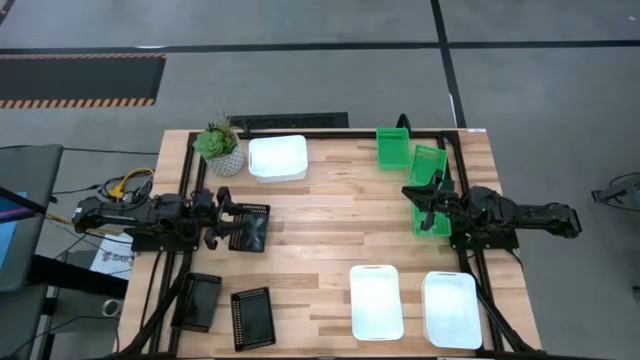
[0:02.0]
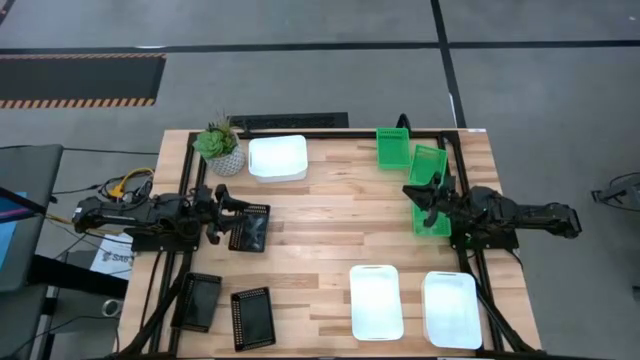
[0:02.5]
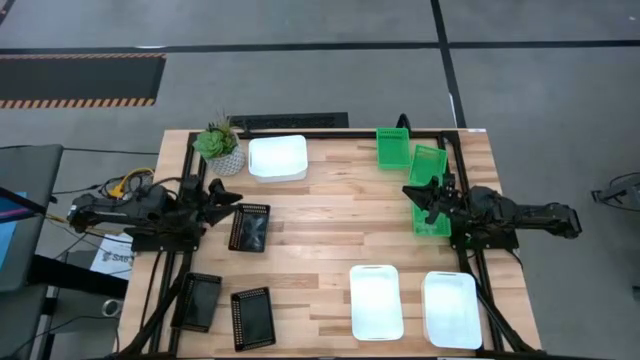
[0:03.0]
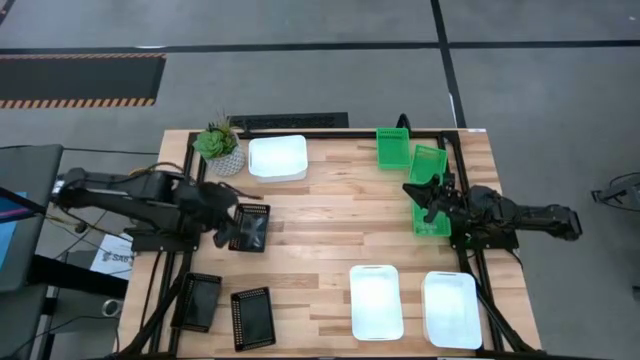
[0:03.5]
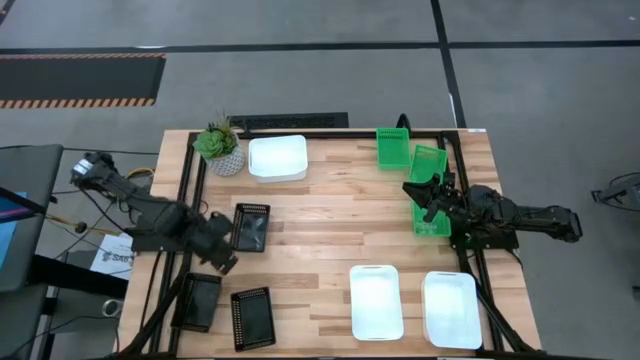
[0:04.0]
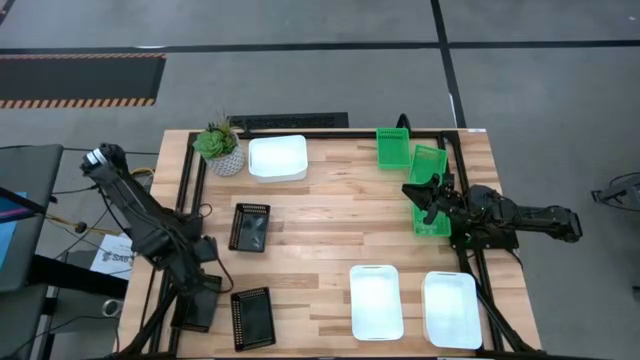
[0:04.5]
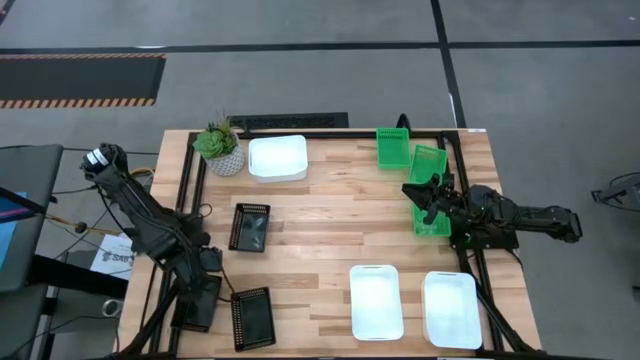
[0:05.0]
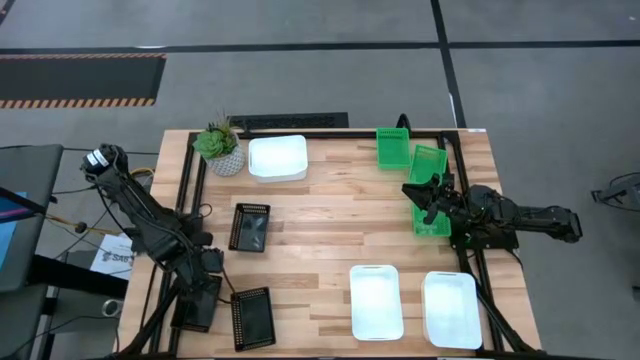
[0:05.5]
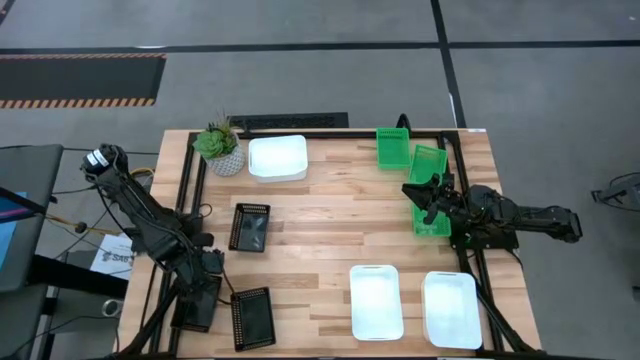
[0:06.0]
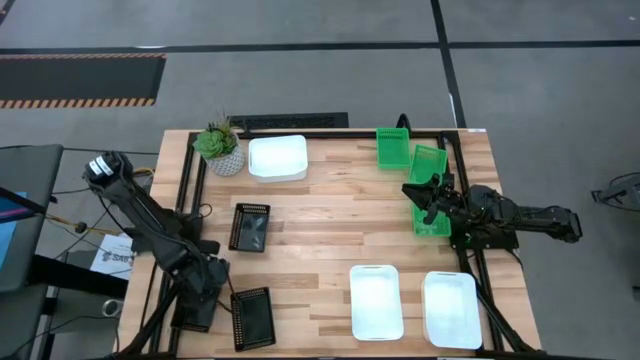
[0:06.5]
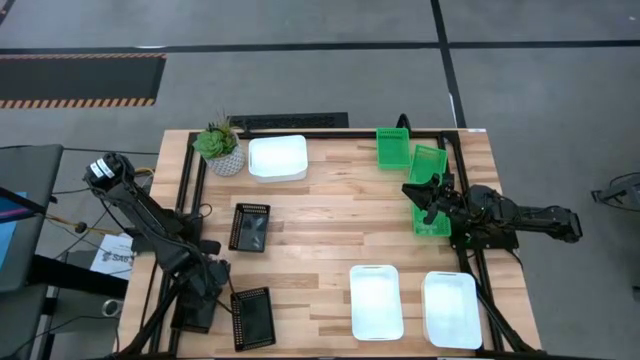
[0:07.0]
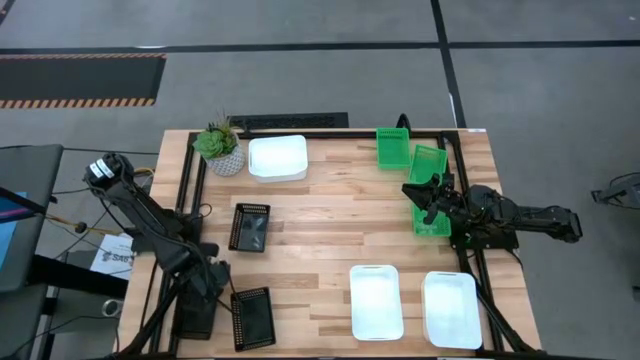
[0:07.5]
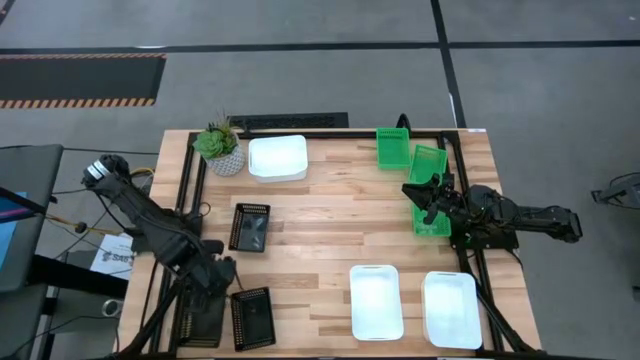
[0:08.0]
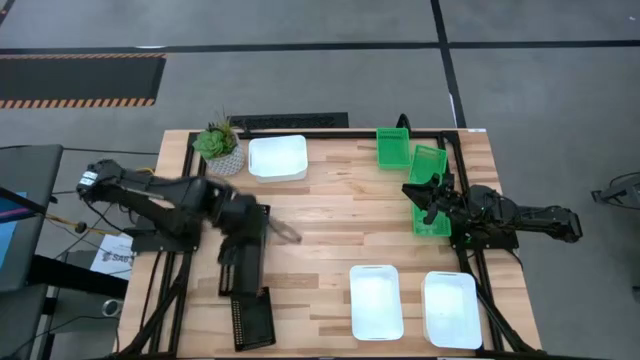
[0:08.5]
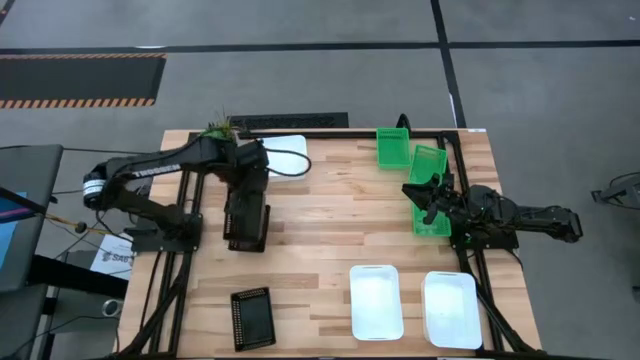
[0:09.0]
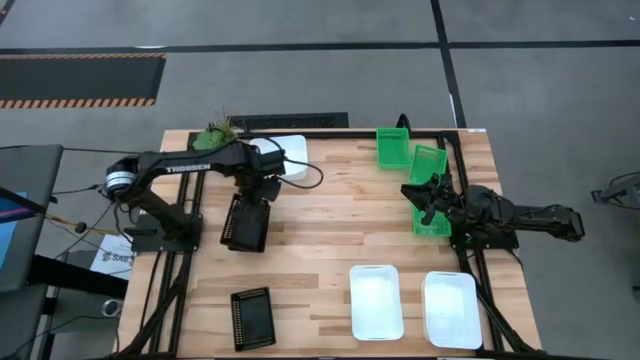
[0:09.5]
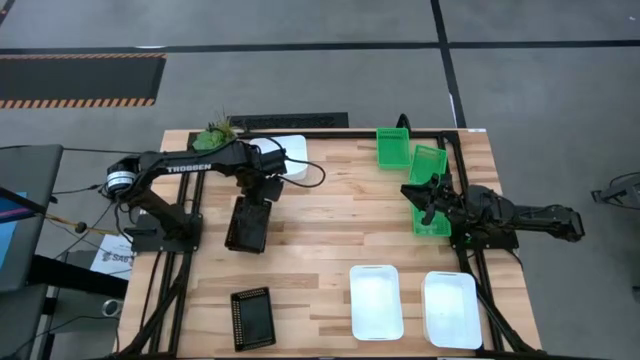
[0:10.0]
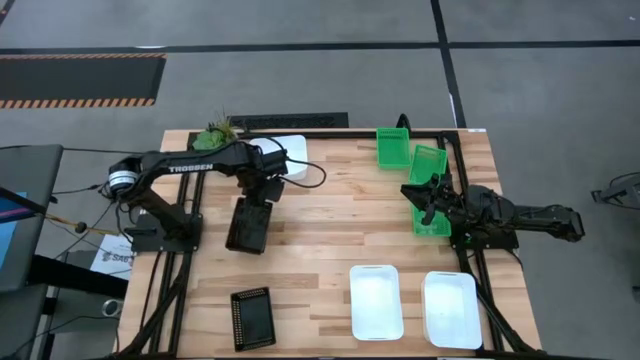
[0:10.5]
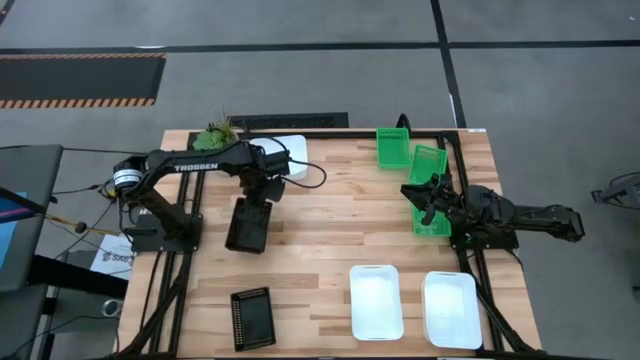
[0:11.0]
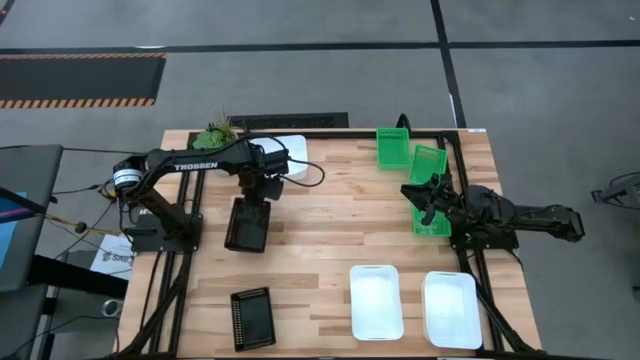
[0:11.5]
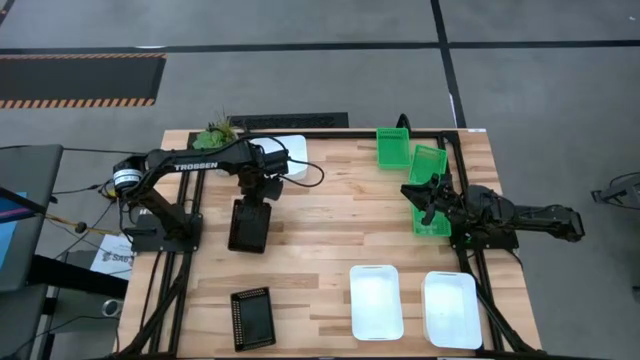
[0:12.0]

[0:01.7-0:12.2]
Stack the left black bin on top of the top black bin

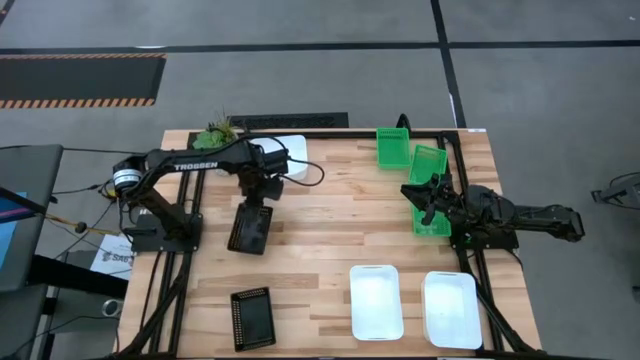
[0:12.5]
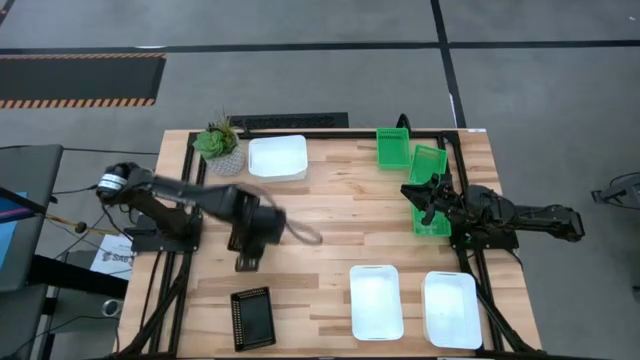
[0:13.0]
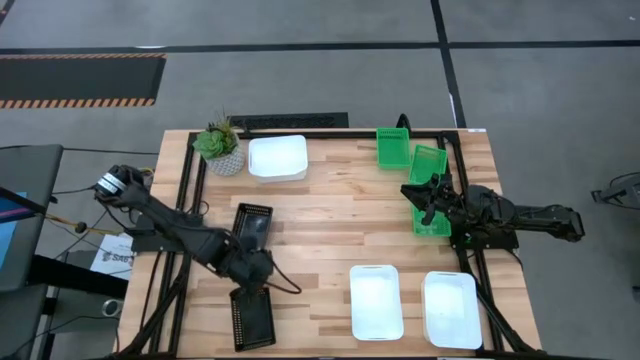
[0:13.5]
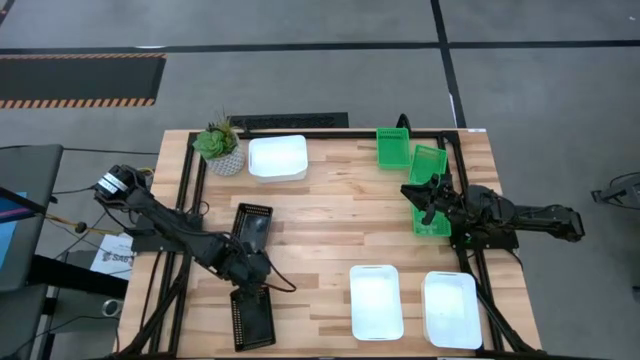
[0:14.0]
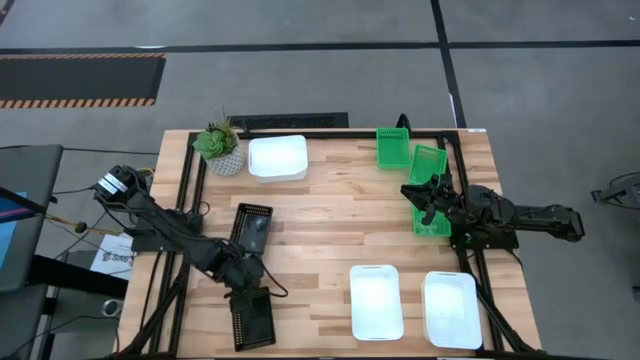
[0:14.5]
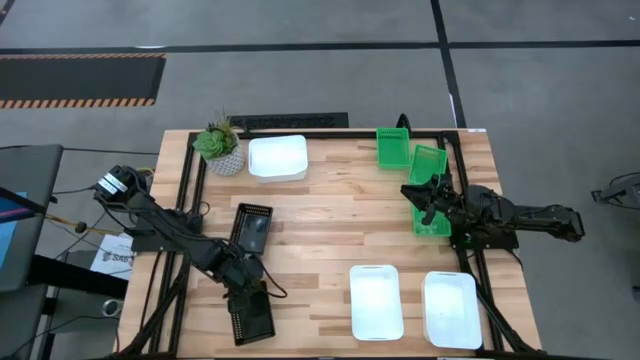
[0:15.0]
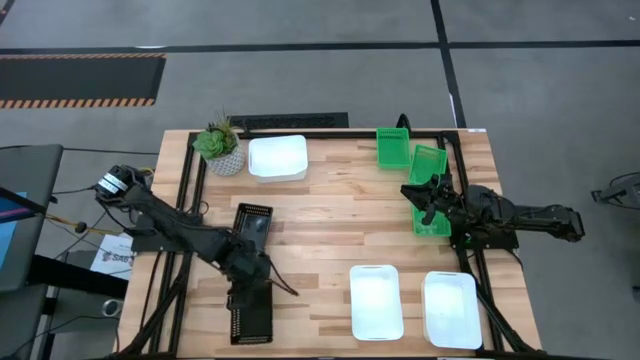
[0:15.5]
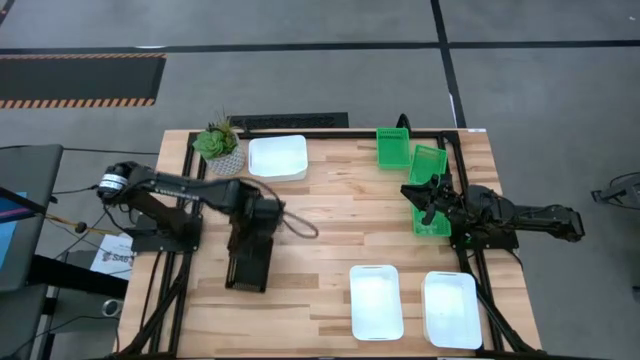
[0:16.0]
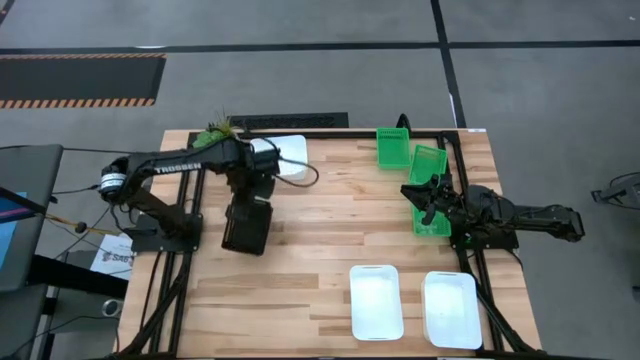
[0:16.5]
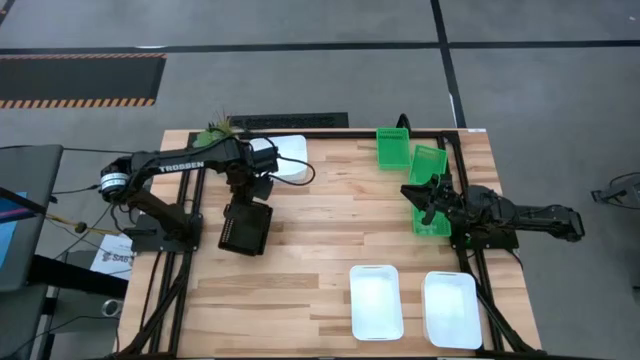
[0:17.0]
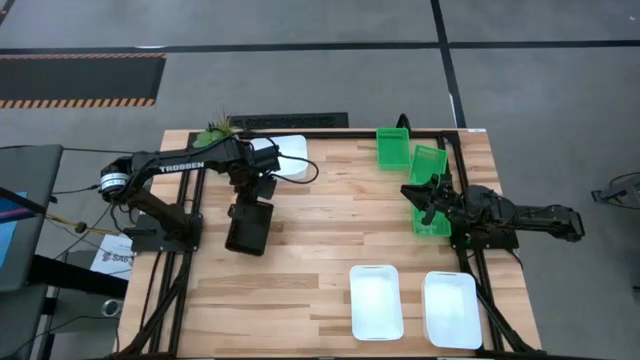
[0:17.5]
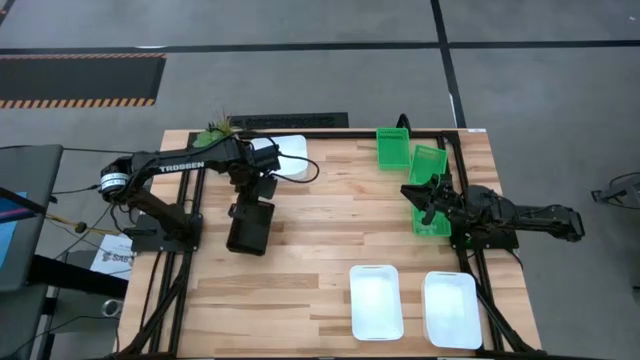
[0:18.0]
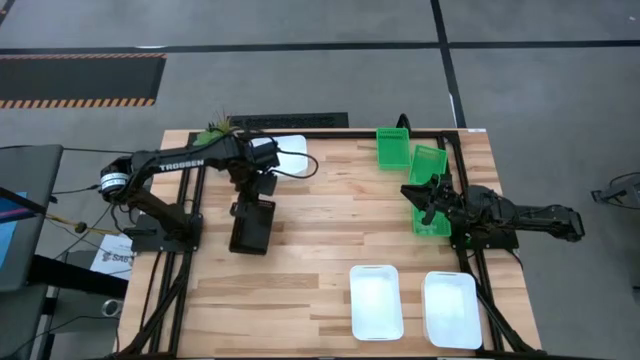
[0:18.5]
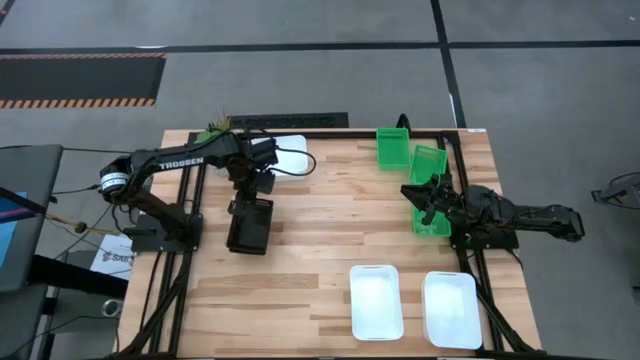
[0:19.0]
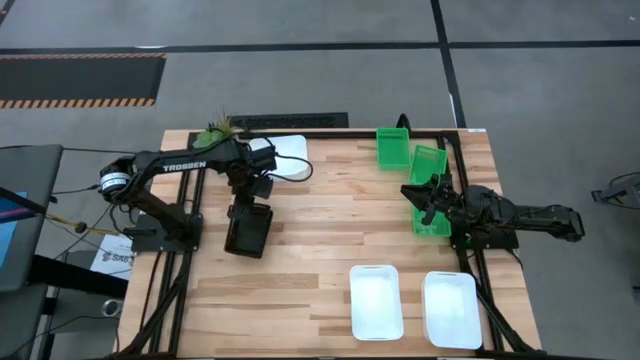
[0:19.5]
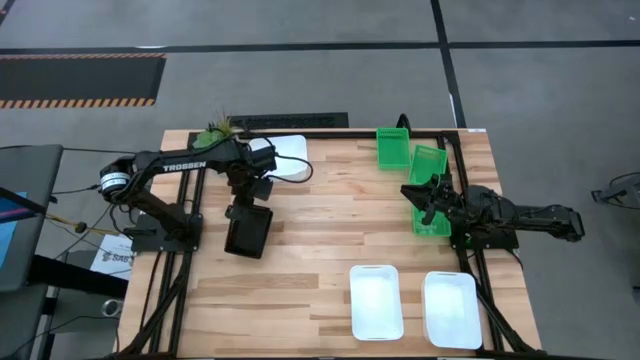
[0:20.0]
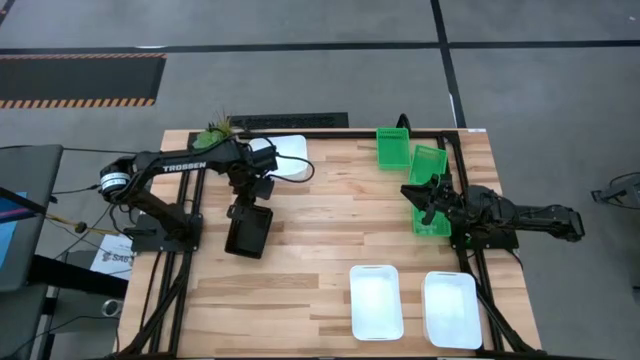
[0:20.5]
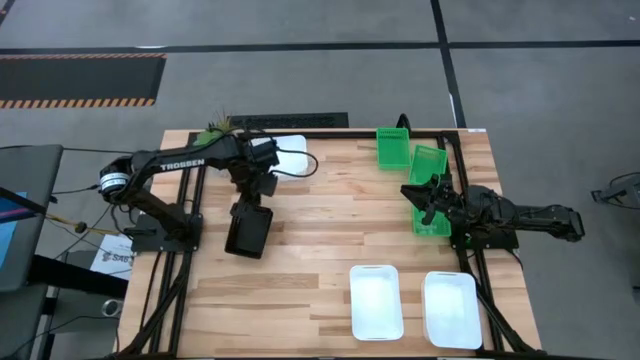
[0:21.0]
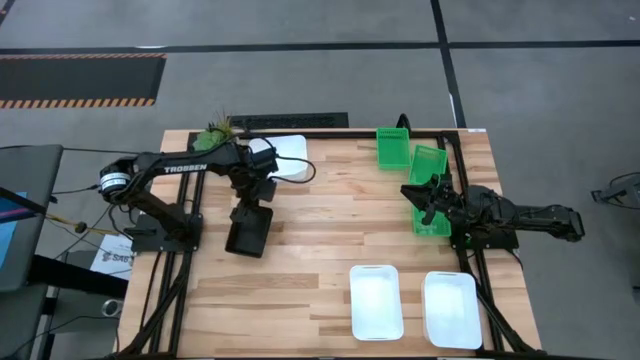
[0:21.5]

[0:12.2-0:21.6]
Stack the bottom black bin on top of the black bins
